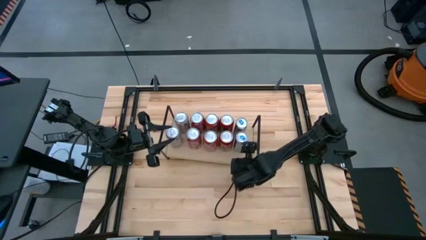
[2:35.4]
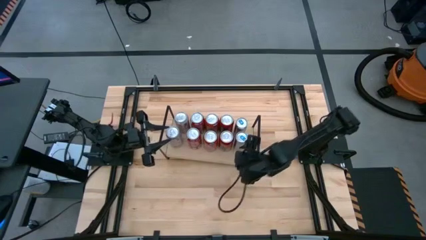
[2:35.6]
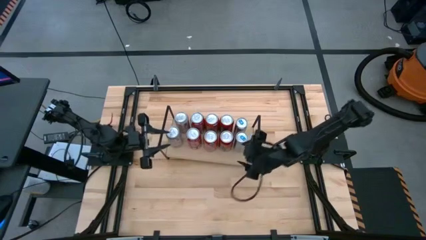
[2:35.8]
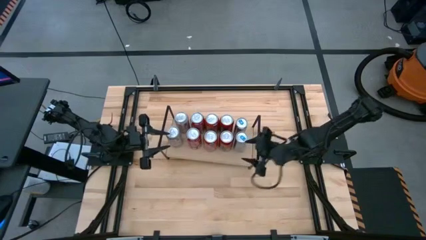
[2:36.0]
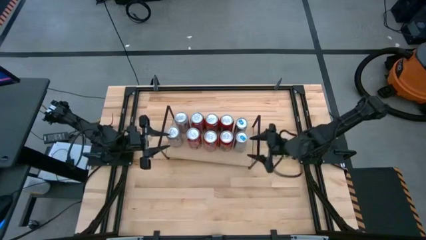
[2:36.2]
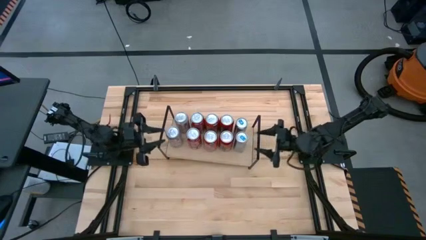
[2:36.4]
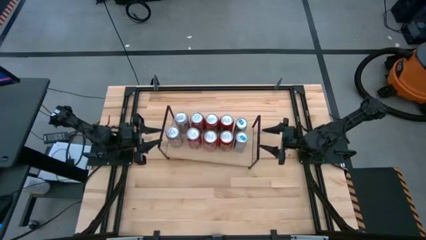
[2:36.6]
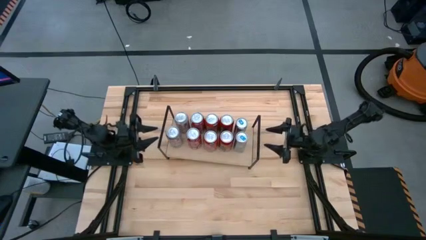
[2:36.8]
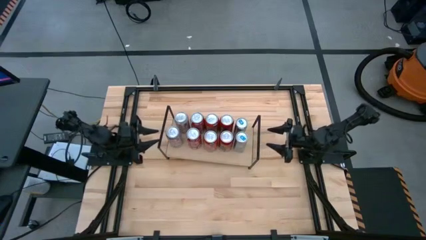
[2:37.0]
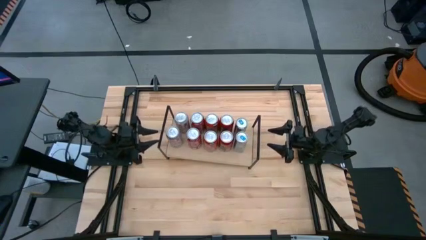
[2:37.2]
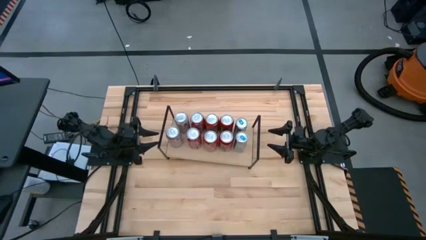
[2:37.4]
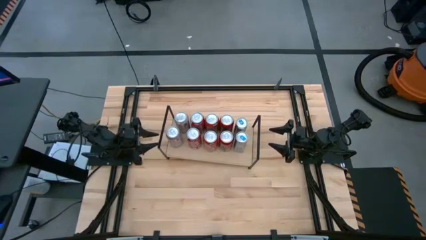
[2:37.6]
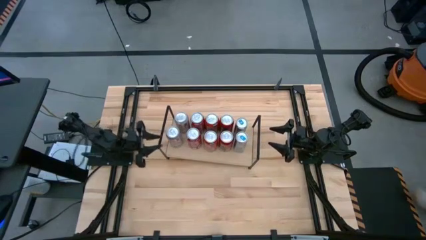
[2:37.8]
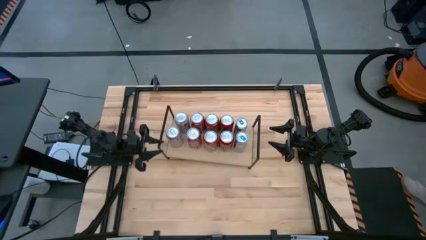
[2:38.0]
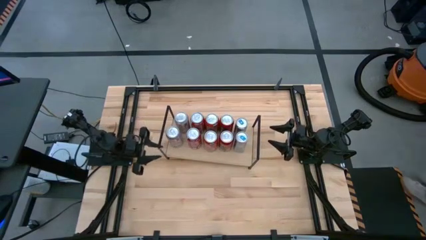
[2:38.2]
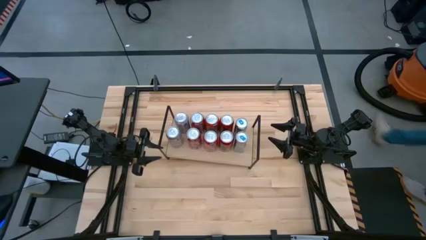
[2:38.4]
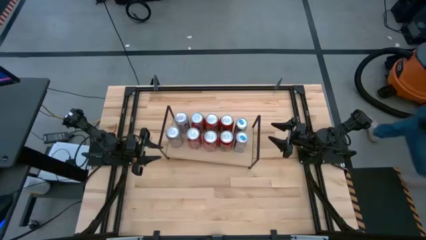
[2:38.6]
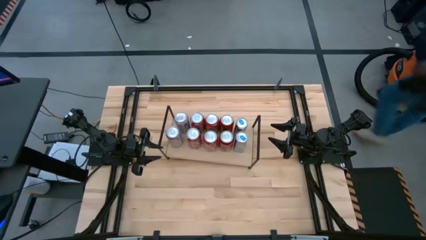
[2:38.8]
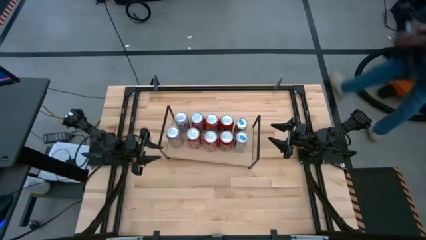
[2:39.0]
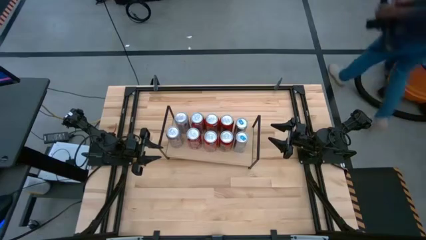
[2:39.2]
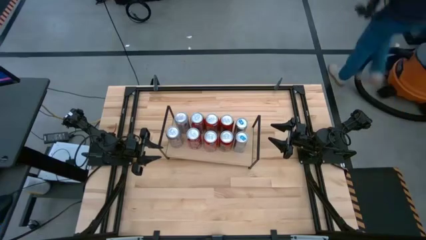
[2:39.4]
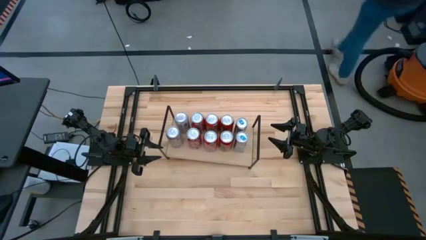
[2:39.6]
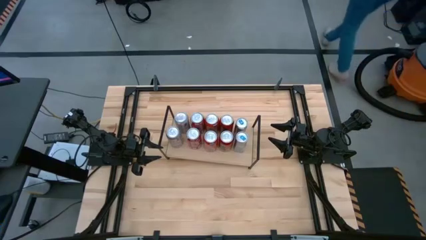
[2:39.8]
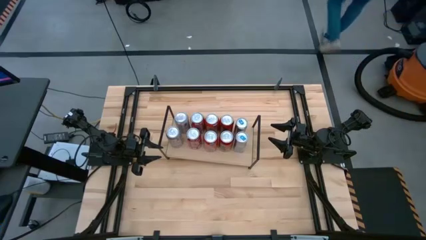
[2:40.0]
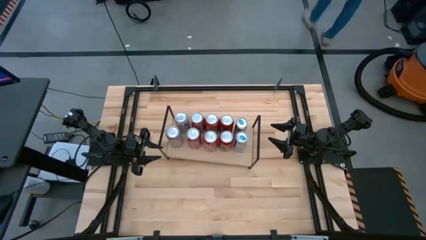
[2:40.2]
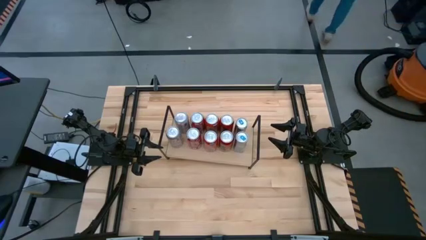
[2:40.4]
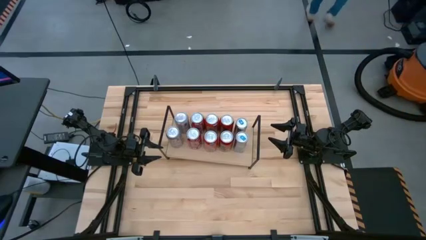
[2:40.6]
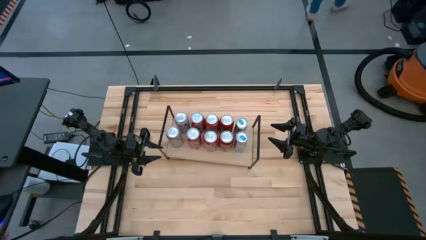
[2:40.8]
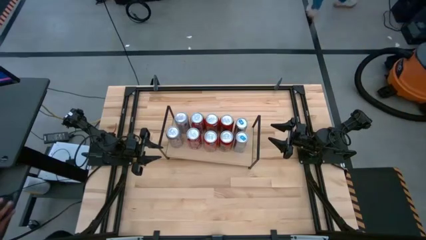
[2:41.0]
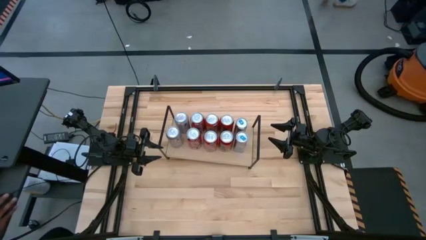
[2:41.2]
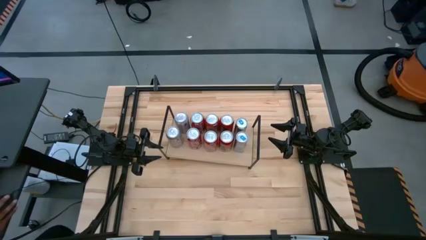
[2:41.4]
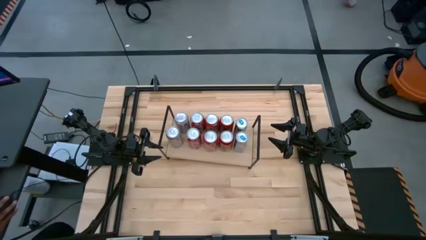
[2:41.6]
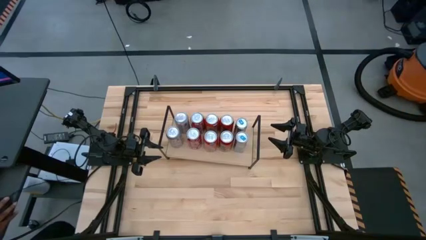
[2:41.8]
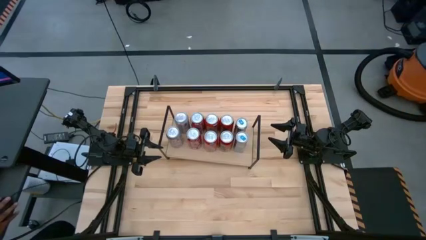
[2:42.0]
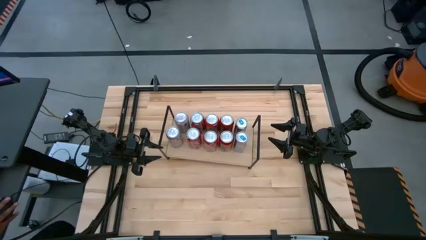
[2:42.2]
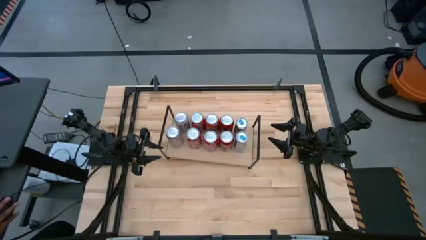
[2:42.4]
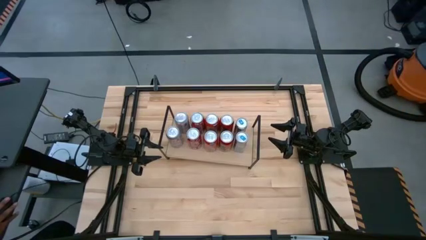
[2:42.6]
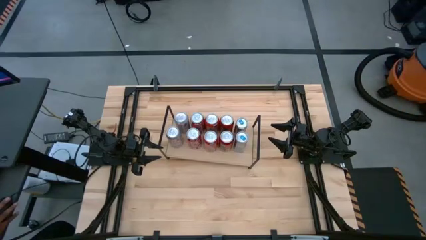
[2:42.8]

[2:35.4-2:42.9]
Task: Place canned beverage on shelf
Return to Home Position

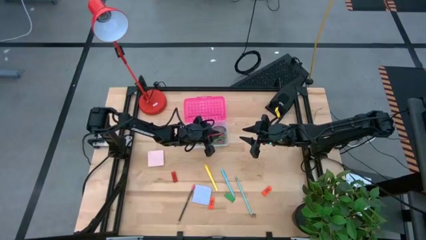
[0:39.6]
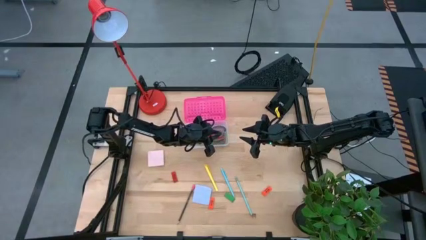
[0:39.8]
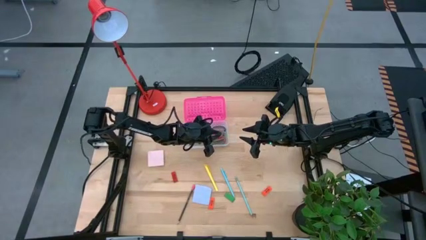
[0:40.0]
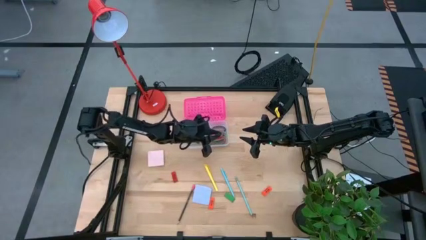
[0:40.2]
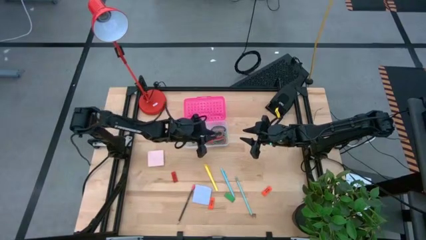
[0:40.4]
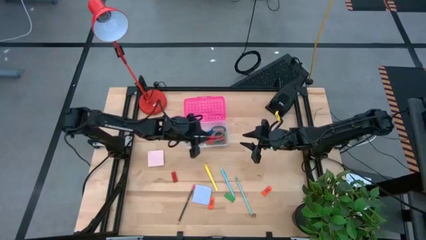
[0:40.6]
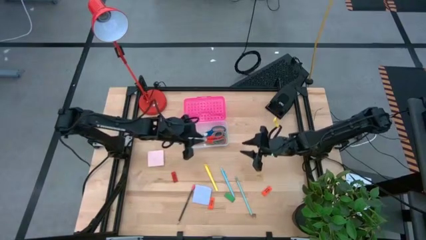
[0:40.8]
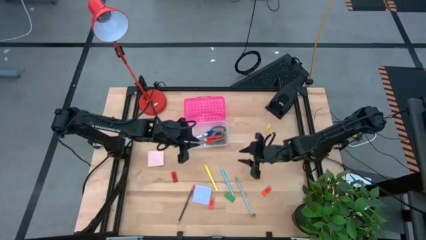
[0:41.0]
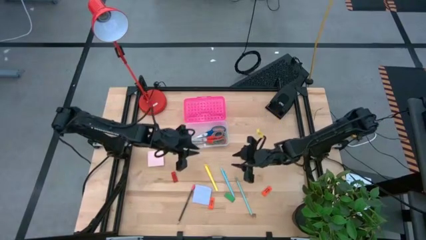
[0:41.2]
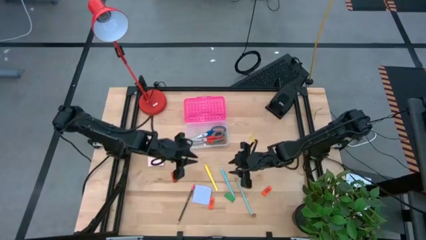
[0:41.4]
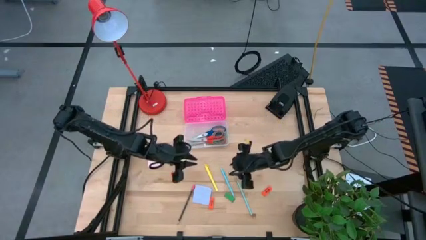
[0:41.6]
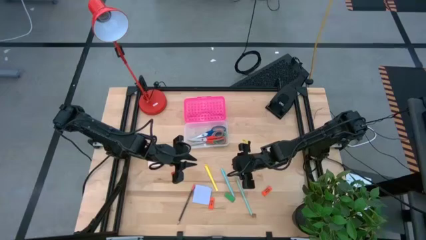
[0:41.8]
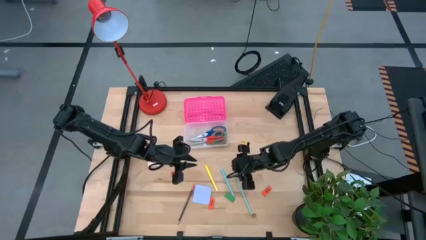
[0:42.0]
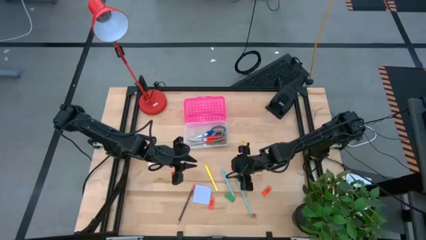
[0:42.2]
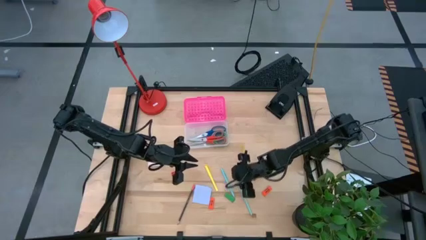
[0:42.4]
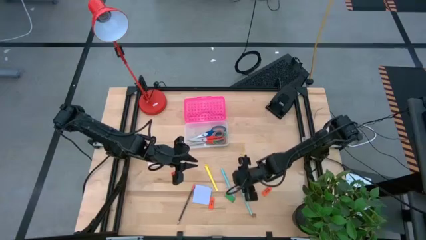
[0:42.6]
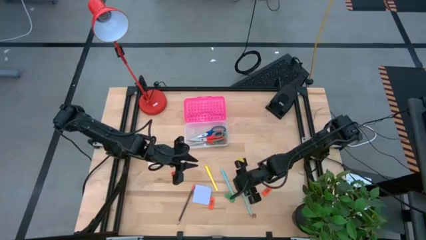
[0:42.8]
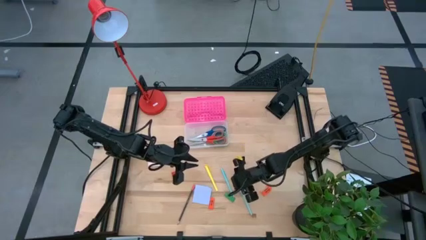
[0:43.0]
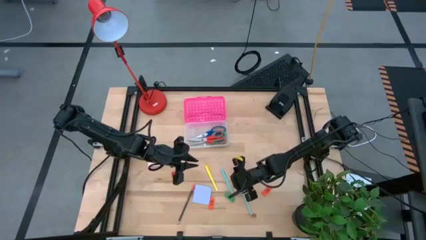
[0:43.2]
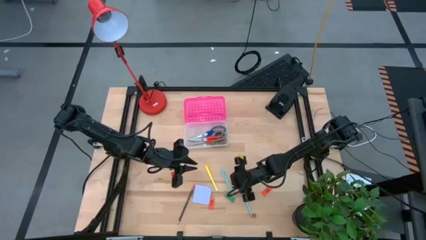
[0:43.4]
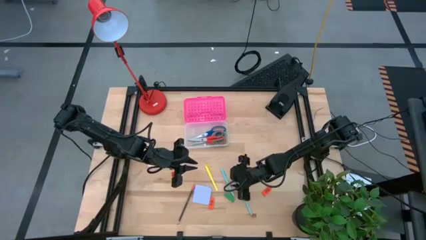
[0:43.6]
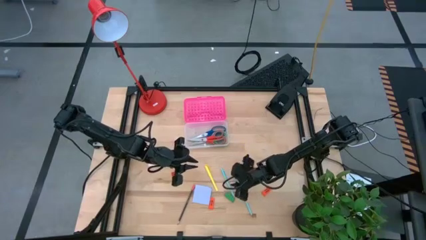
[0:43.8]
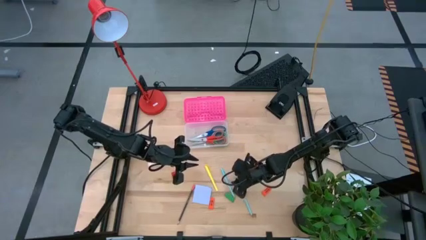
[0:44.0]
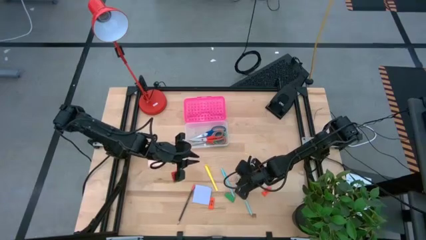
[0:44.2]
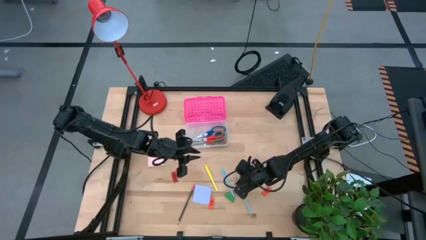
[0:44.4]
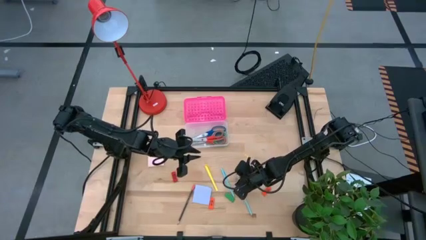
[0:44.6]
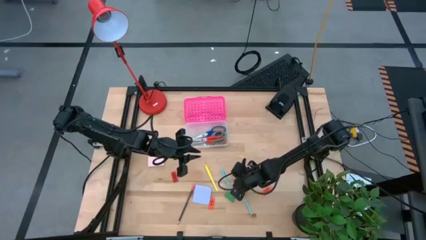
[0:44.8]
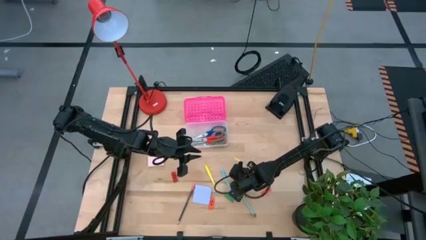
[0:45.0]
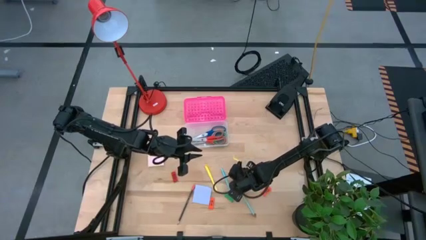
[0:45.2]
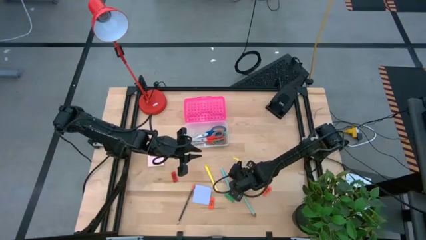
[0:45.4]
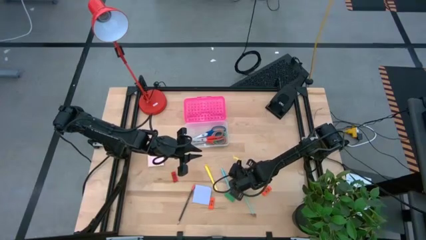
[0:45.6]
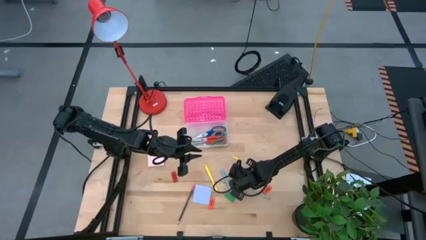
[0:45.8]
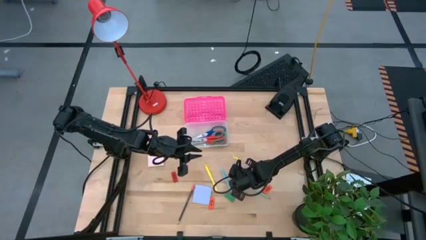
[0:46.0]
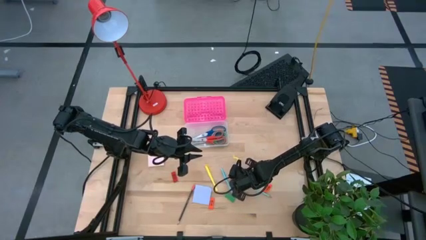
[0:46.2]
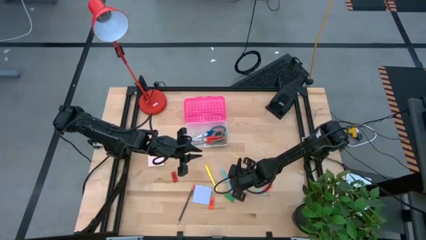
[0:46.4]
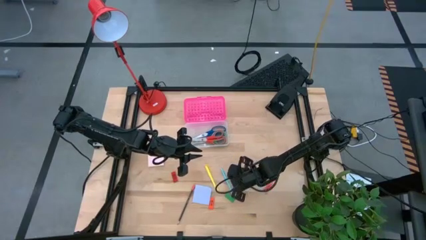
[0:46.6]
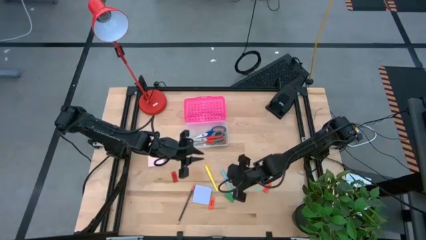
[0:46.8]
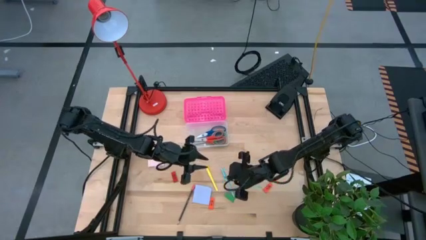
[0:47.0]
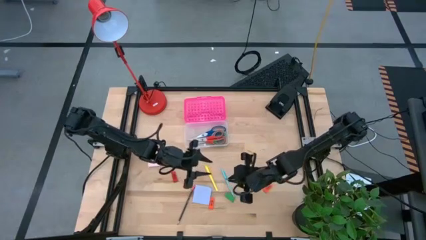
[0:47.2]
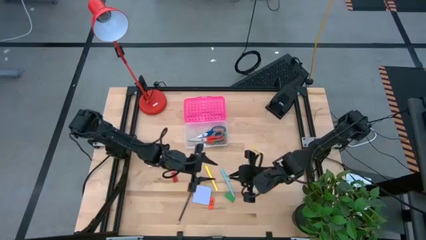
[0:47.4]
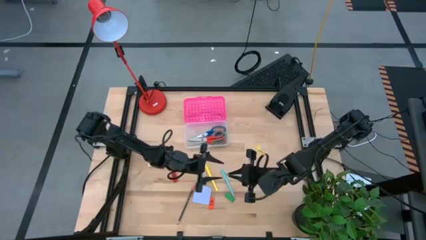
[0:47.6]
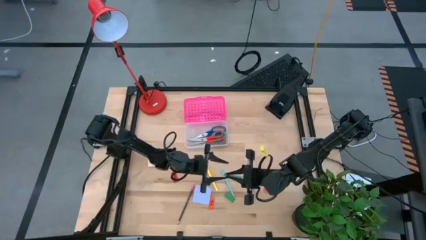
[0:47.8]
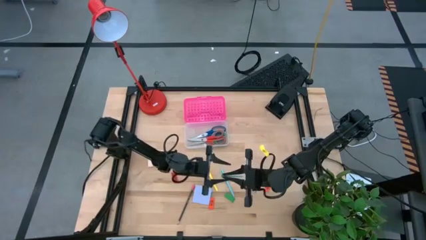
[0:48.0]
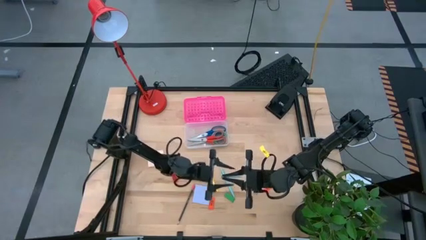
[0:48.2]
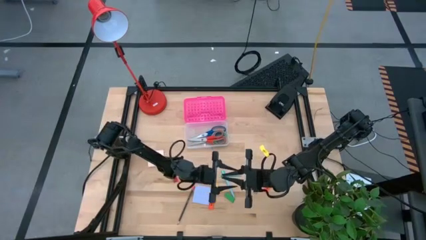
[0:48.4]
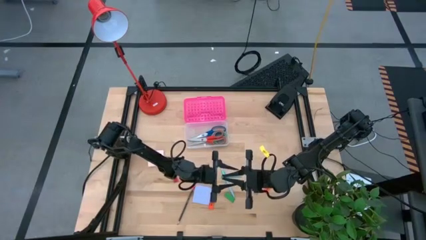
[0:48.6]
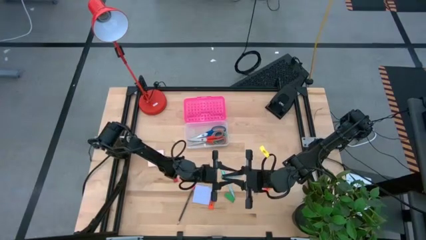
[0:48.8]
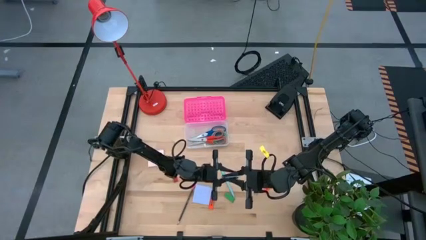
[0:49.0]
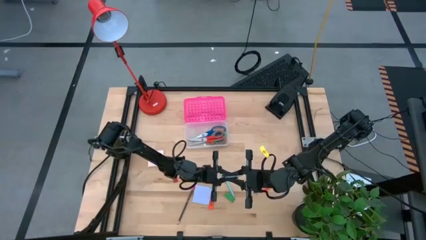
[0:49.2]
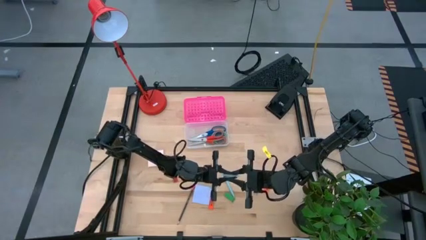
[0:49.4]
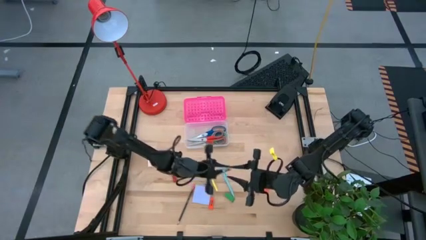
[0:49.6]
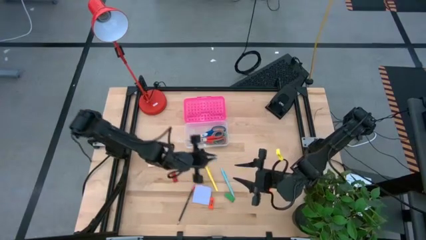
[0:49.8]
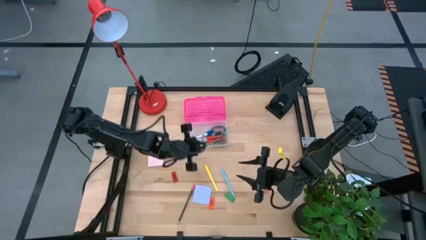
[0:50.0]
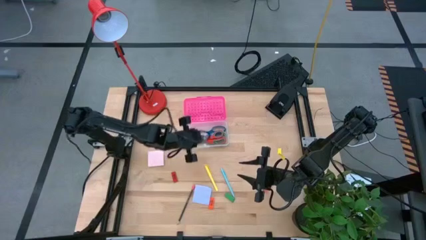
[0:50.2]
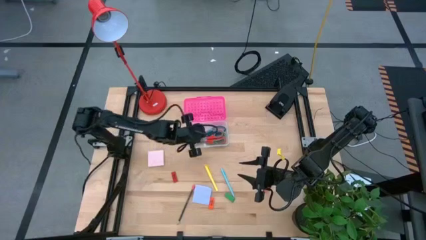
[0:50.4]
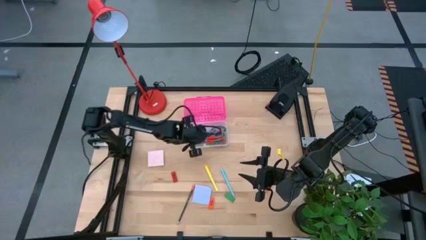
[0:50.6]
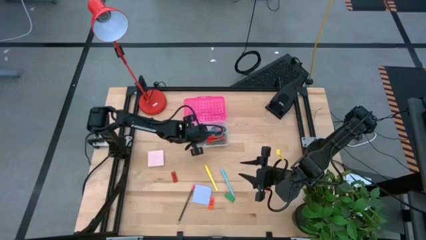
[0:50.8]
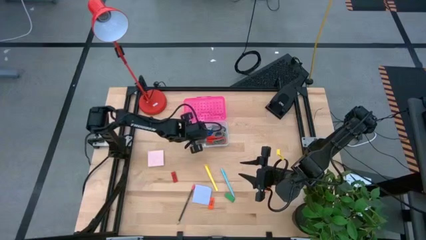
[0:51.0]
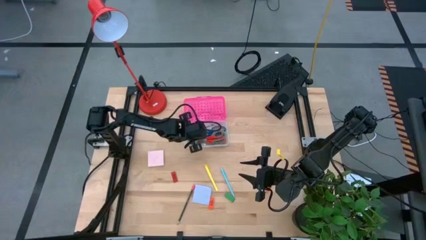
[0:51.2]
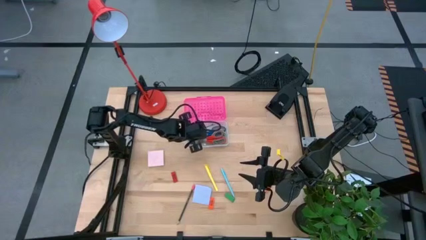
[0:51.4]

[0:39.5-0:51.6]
Task: Pack school essentials
Put the light blue pencil into the pink supply box
